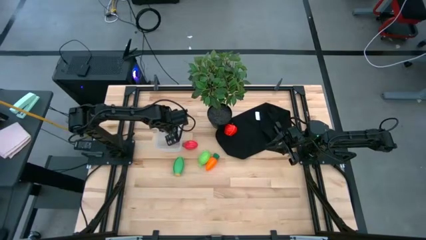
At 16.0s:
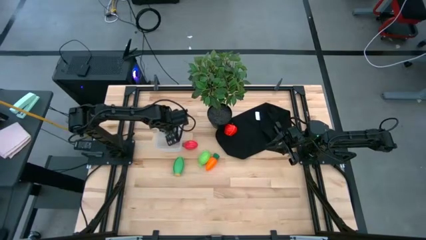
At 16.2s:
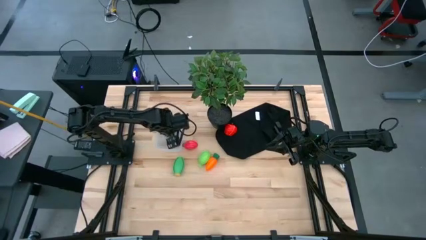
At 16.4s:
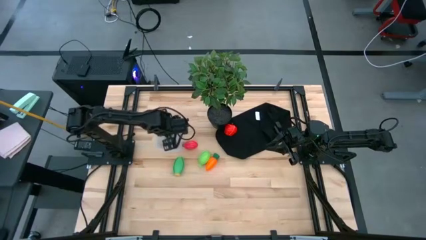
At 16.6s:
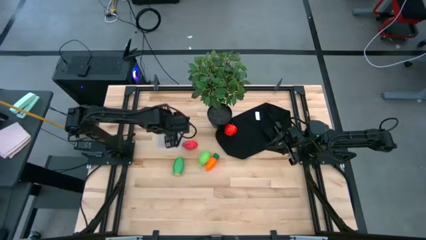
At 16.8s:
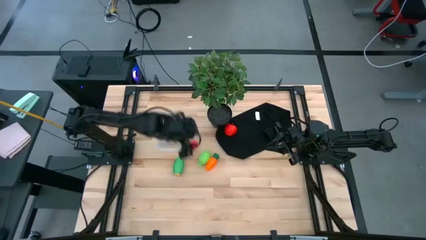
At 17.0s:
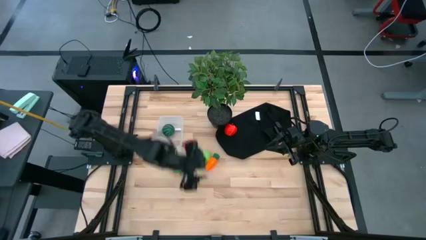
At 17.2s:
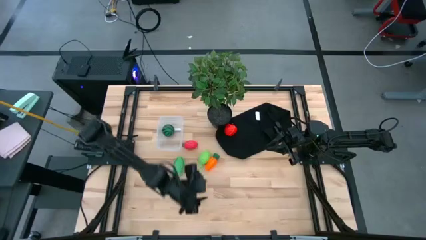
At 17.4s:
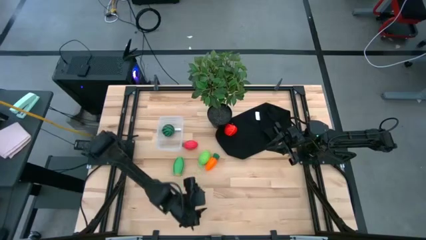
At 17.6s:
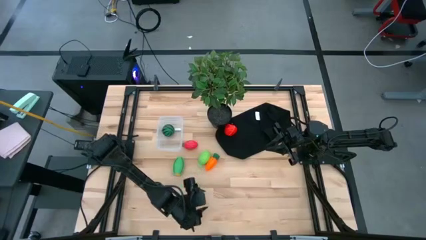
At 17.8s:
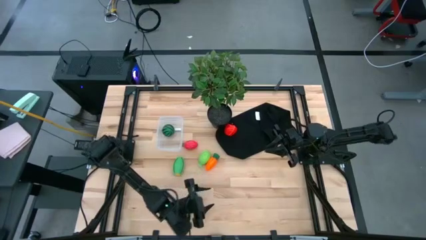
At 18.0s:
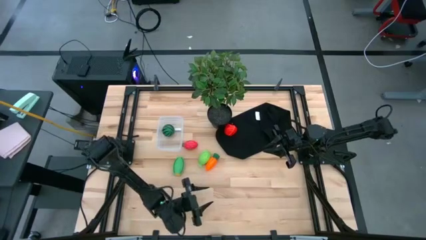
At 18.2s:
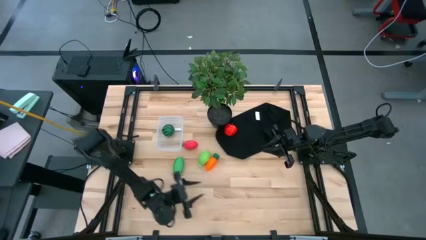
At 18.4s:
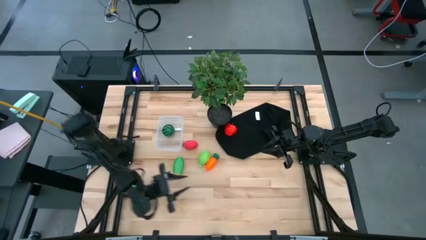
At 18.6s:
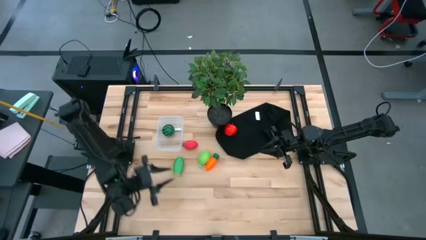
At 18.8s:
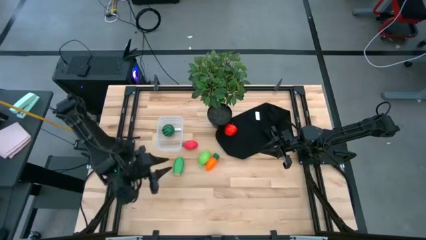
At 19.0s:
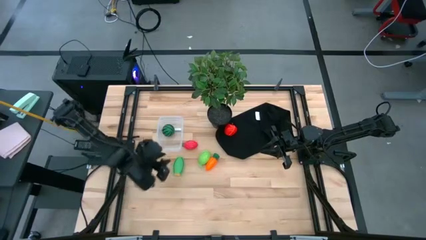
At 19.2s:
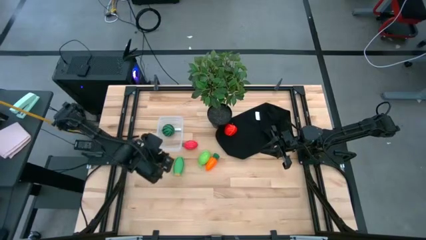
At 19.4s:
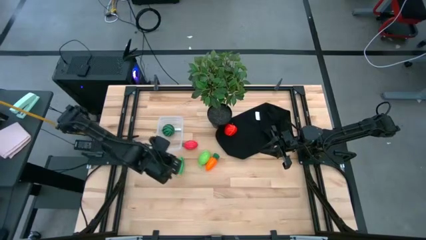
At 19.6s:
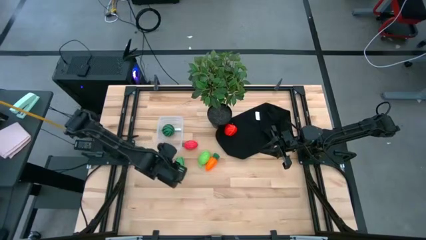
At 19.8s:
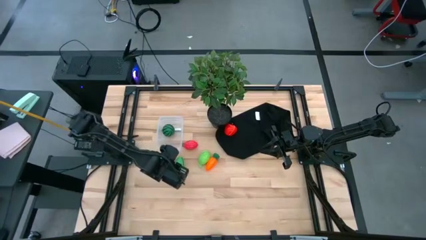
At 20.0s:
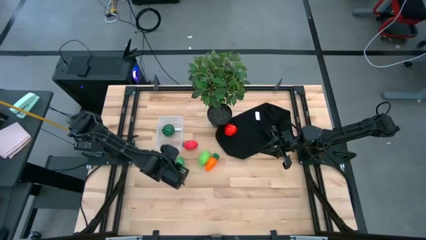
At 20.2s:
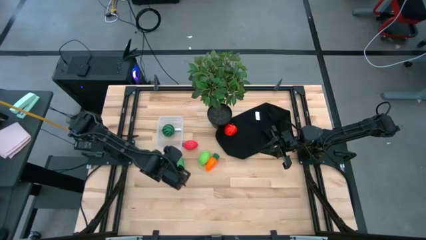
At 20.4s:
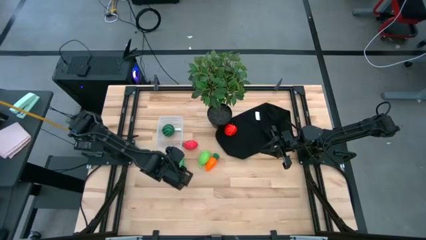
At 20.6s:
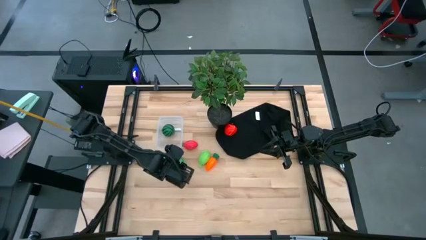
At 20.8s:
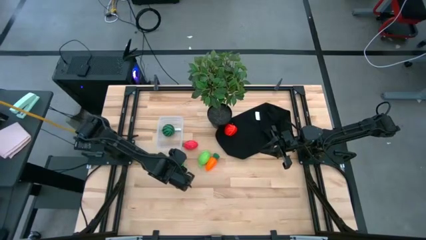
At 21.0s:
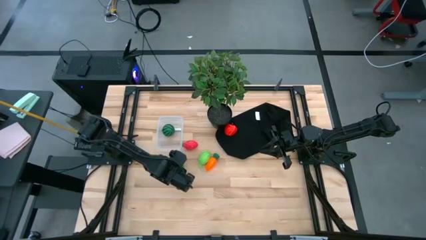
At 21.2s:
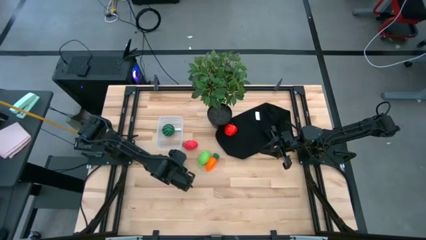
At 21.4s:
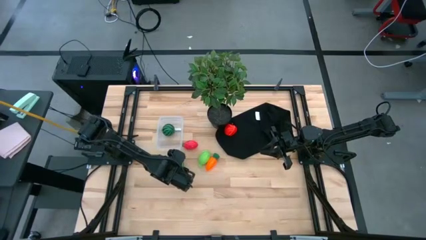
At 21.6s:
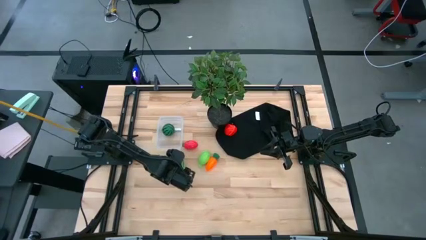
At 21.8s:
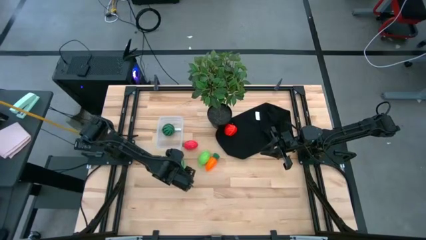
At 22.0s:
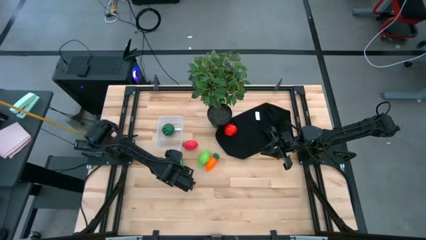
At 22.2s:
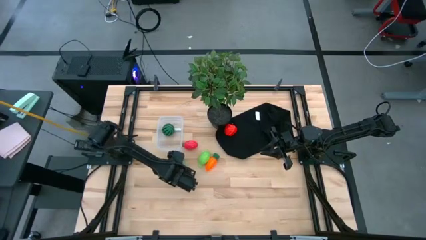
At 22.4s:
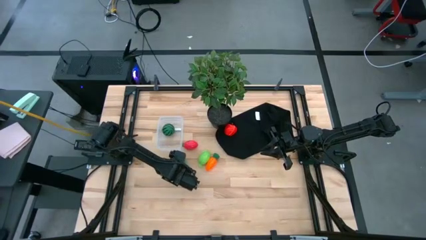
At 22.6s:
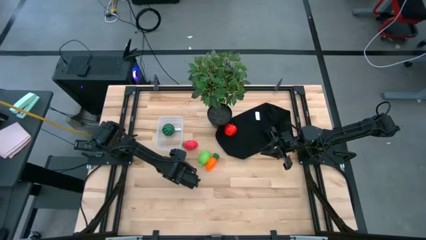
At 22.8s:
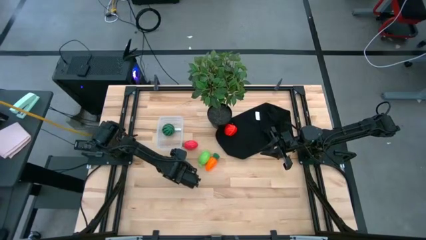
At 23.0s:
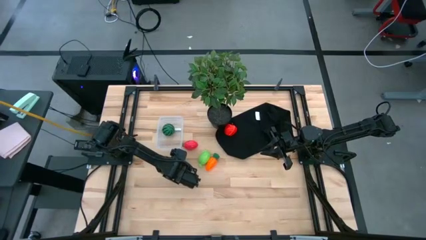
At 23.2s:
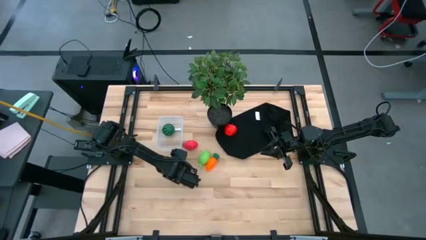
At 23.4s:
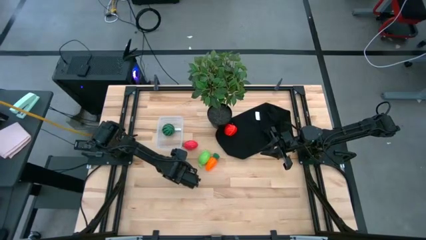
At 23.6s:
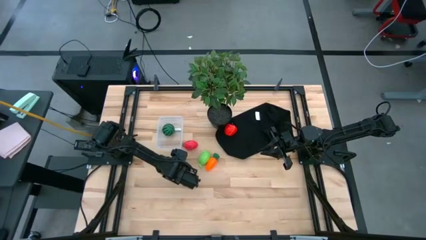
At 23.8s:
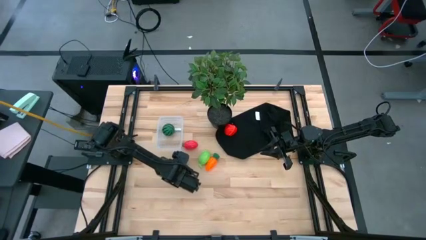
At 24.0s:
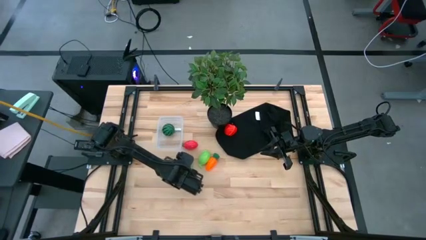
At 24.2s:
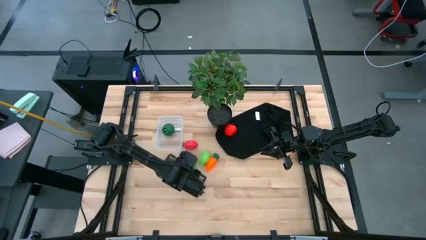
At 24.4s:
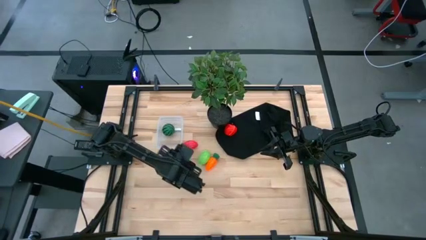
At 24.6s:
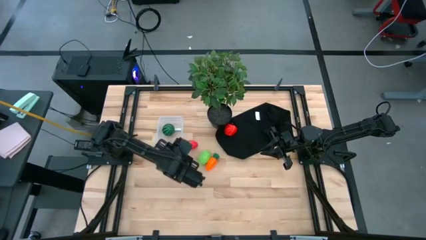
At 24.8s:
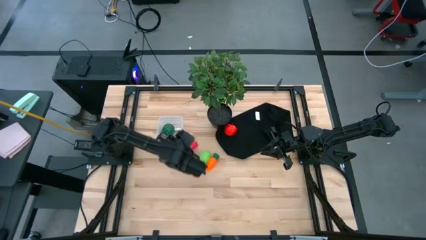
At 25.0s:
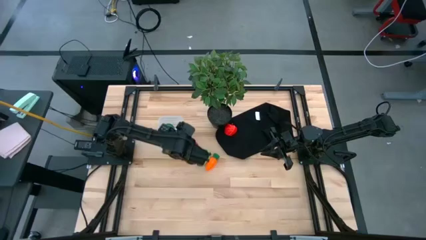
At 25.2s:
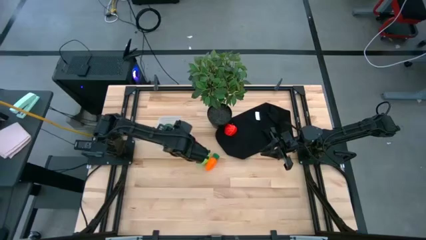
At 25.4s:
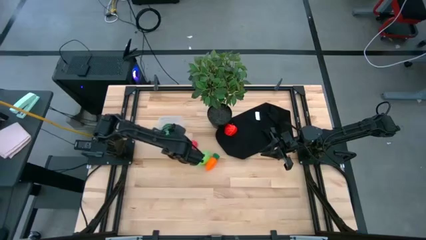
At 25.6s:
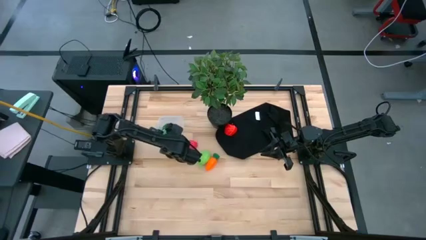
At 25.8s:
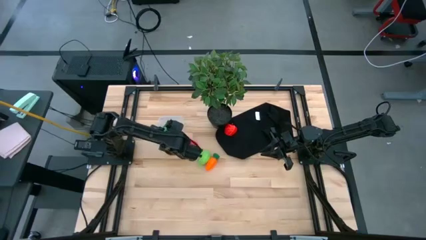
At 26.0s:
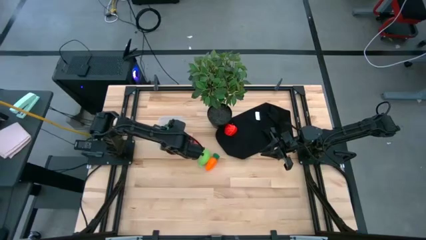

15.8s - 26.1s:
Task: Pick and placing Produce into tupperware
Put the corn into the bin
